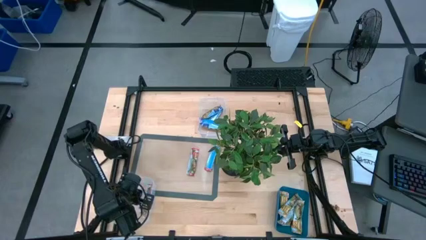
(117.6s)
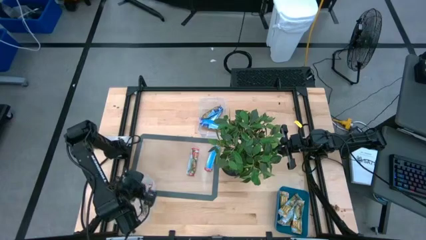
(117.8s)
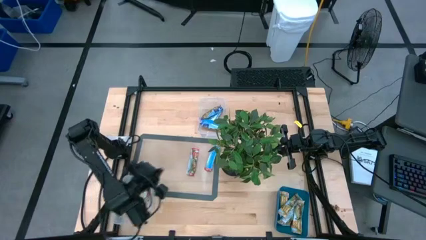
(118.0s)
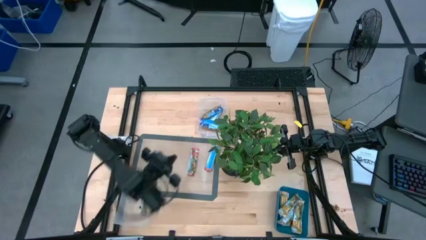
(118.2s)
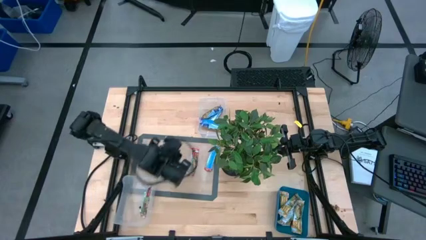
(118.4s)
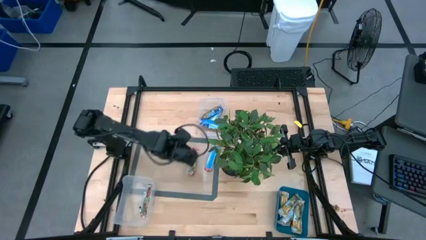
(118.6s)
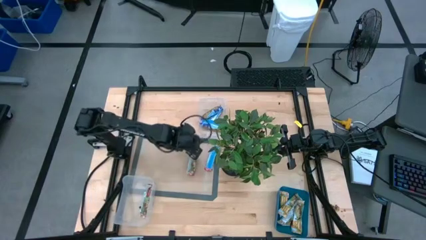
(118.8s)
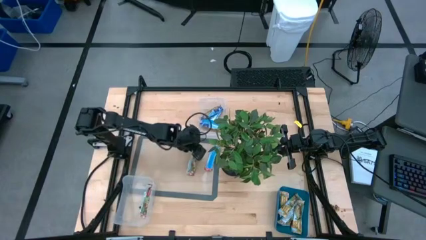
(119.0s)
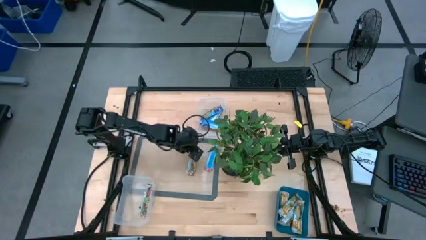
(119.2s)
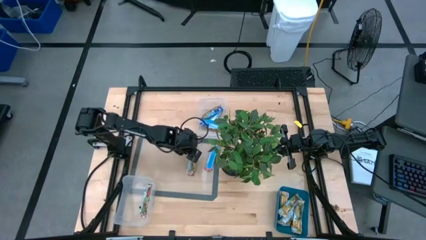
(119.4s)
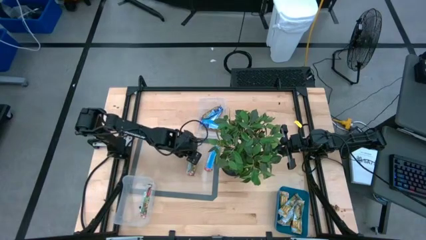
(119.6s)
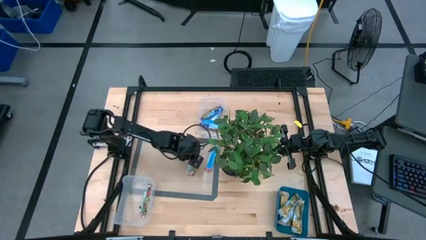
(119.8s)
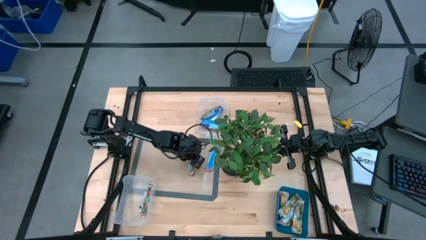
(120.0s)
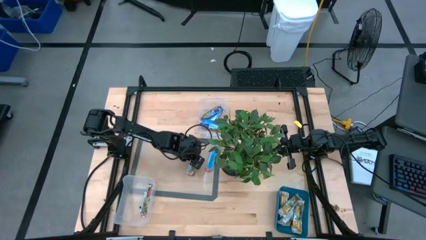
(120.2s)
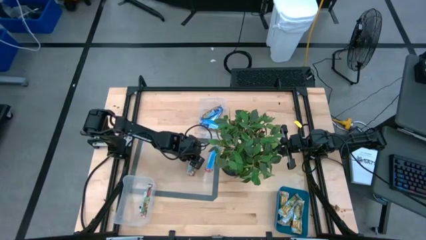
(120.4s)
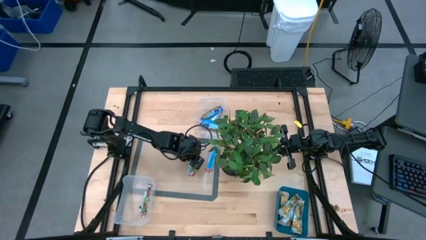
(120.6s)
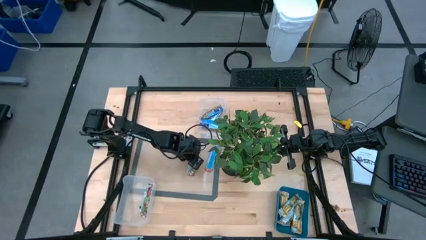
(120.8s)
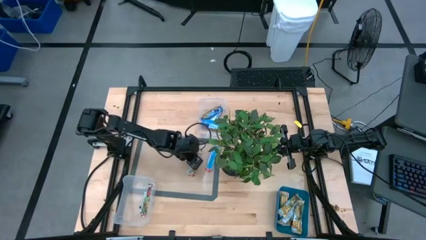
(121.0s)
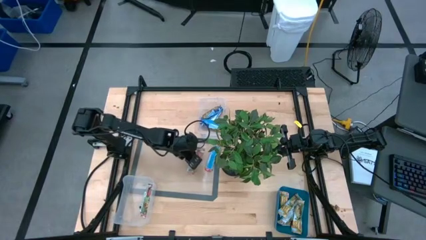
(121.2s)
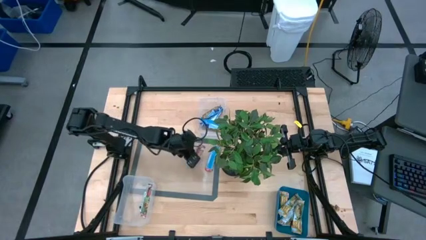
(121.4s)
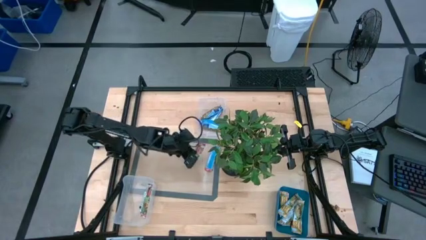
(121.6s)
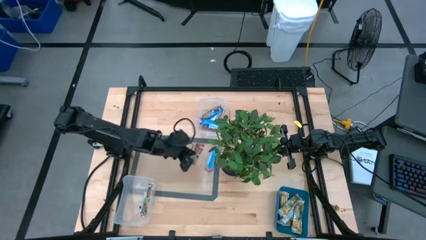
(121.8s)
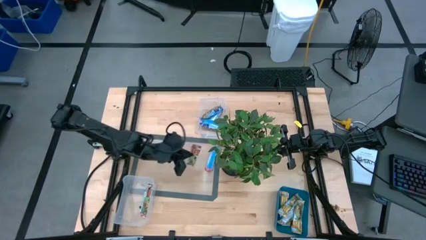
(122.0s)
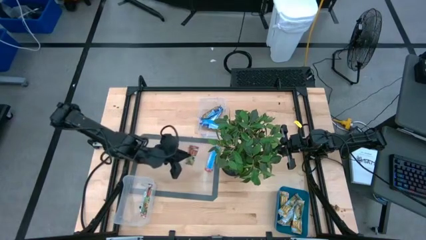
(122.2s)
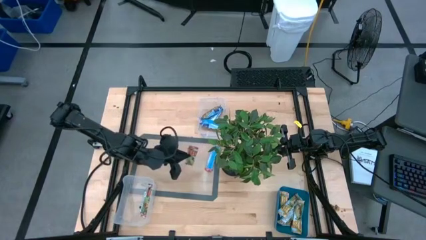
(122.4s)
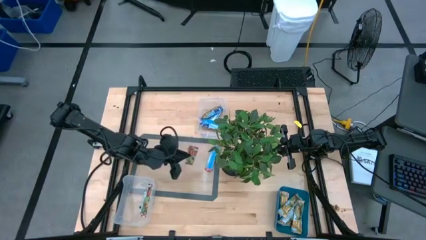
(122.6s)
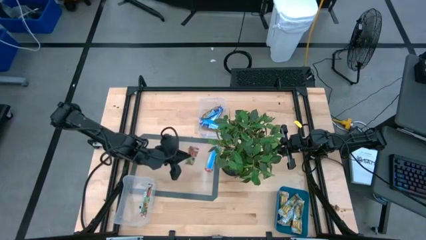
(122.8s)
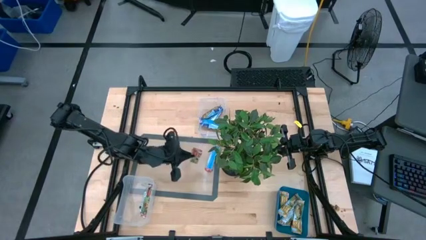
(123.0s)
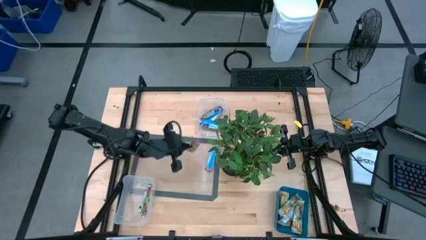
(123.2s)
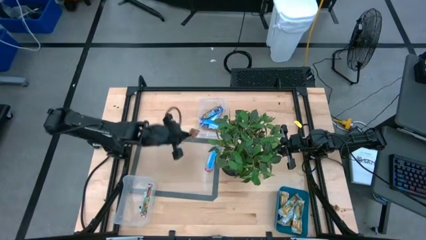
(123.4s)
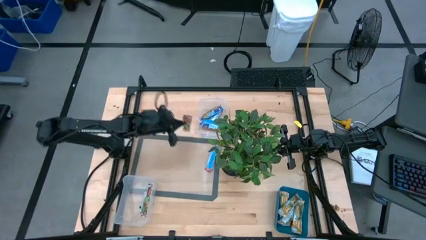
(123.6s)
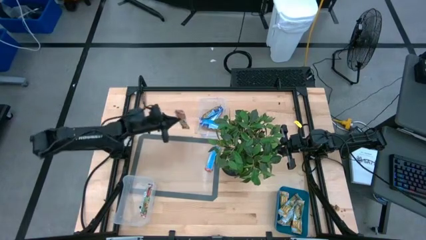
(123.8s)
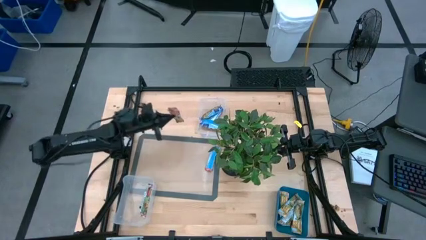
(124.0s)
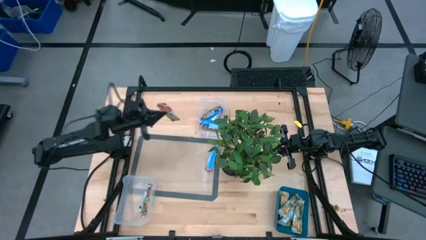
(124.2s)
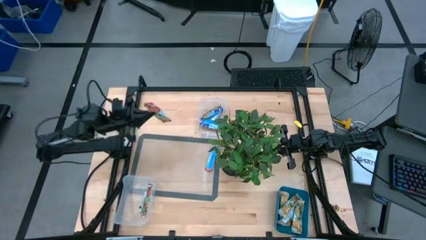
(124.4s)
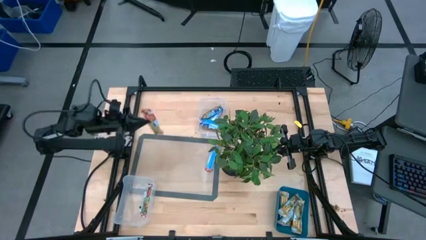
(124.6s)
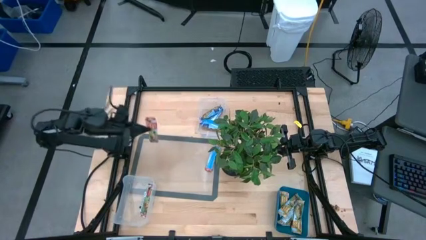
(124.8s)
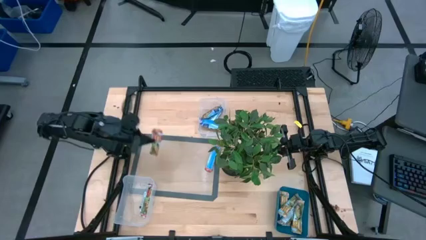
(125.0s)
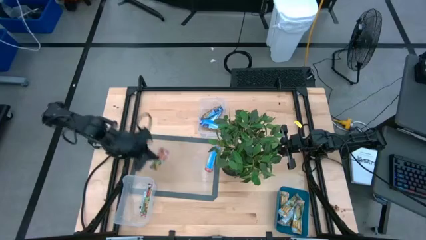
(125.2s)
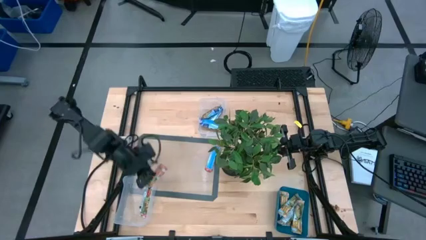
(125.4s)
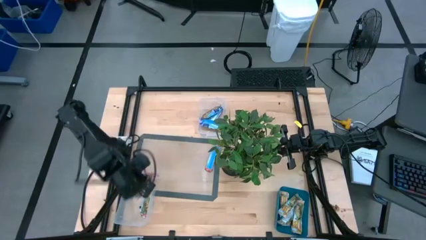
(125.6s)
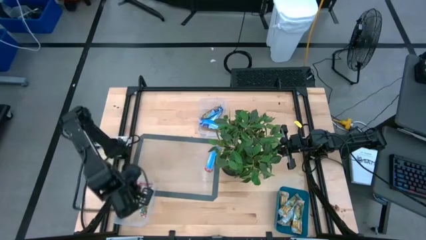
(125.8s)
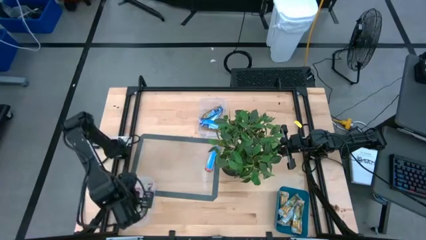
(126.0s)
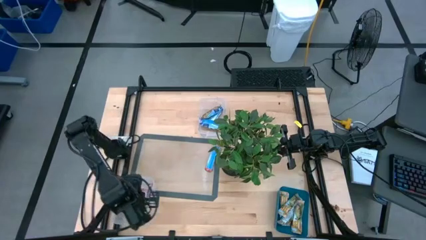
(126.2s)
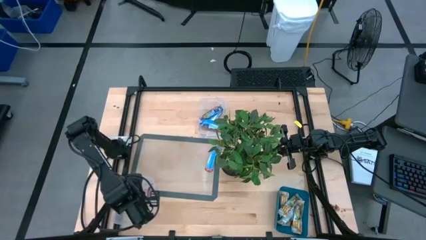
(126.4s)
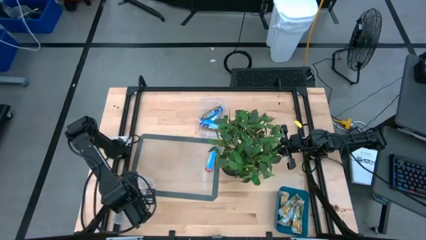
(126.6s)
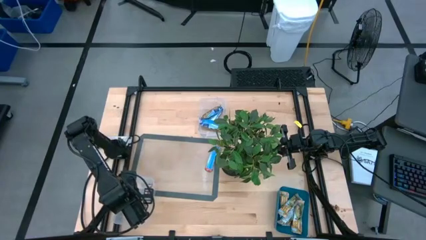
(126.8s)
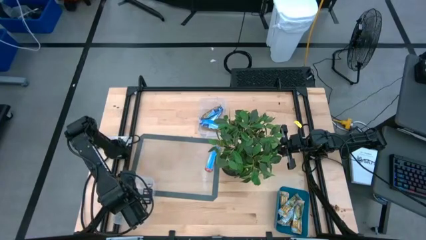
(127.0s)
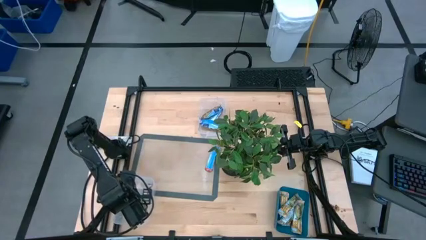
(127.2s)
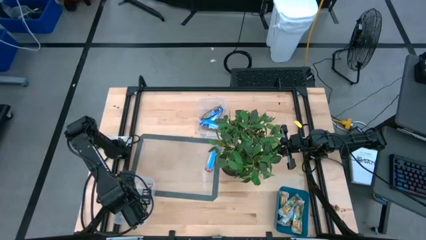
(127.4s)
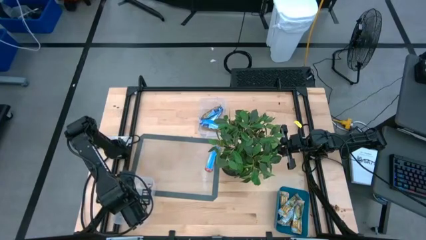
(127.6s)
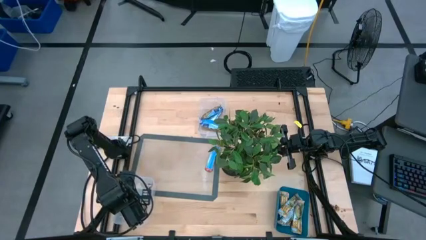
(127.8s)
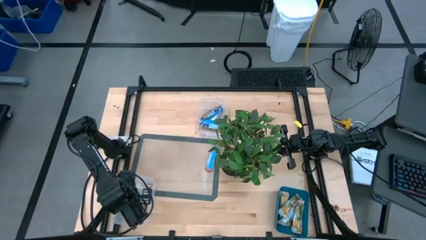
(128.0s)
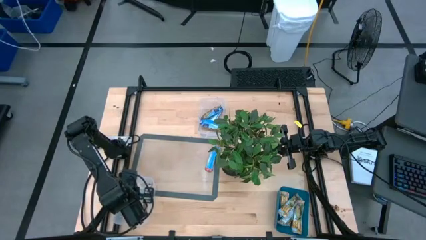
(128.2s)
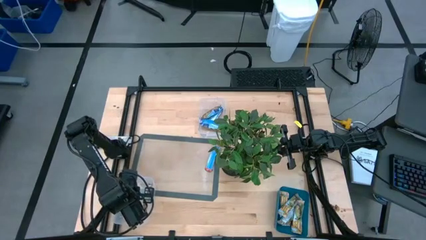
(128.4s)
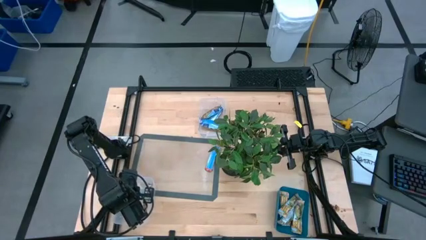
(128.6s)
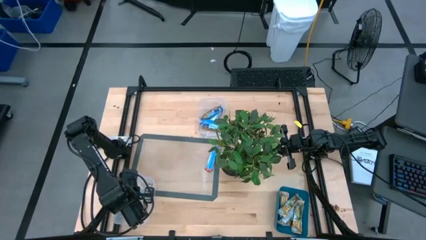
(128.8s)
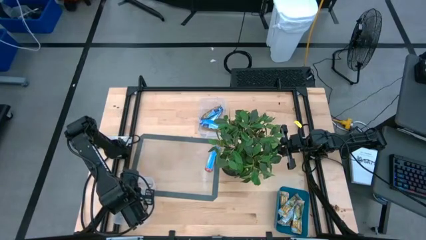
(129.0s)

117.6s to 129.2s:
Task: Pick and place Granola Bars by type
Put the left red granola bar into the bottom transparent bin

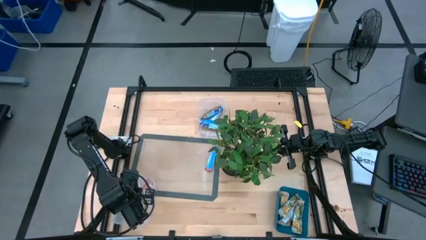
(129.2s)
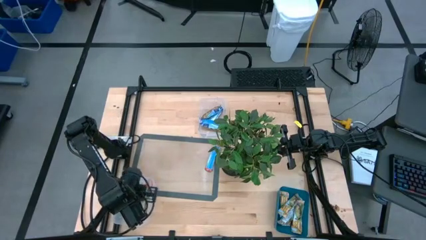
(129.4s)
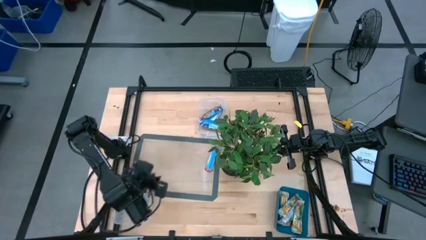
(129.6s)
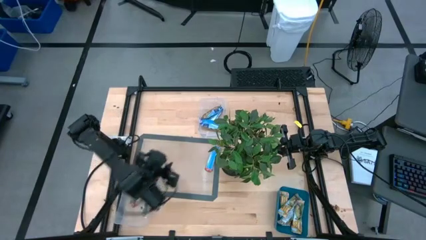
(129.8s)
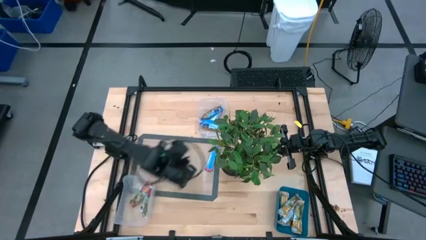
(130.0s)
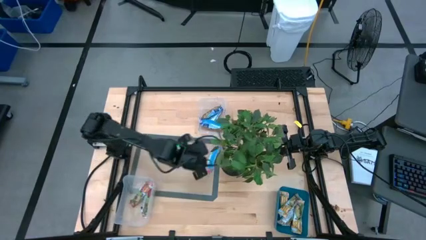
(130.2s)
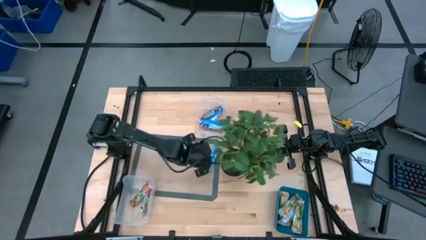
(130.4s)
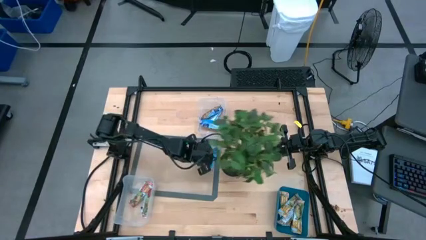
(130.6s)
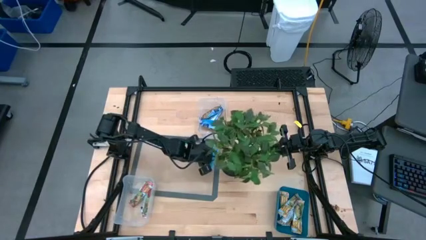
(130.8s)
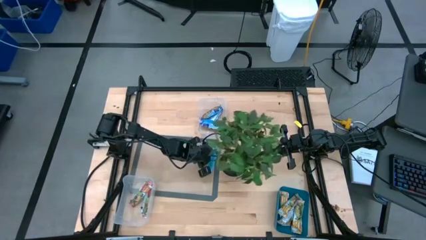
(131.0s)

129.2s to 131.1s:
Put the red granola bar into the bottom transparent bin

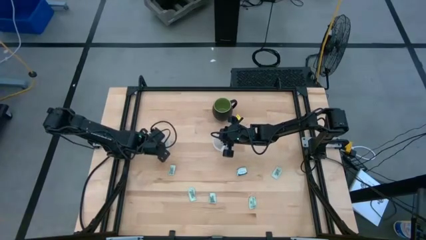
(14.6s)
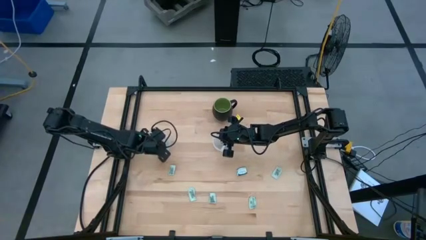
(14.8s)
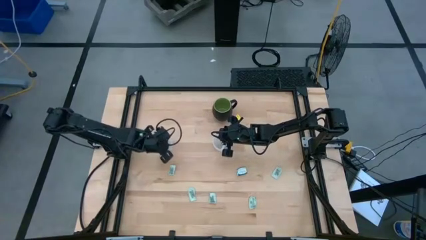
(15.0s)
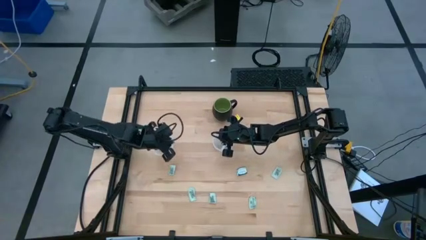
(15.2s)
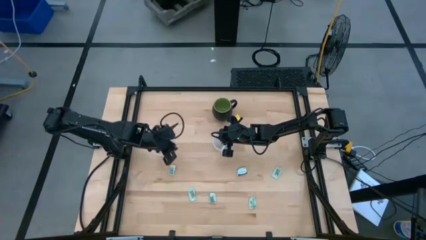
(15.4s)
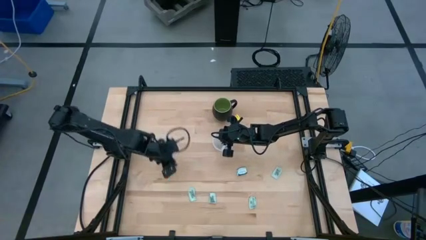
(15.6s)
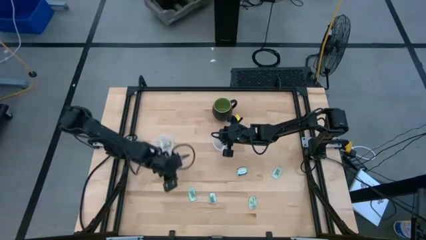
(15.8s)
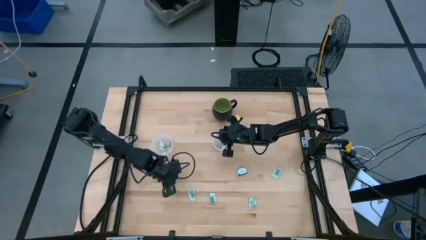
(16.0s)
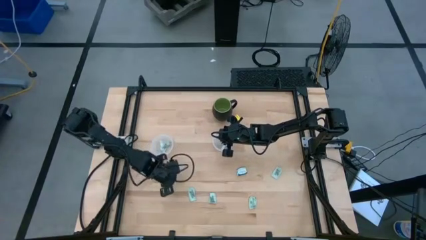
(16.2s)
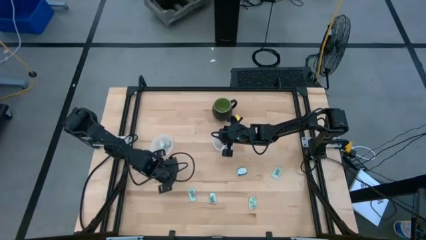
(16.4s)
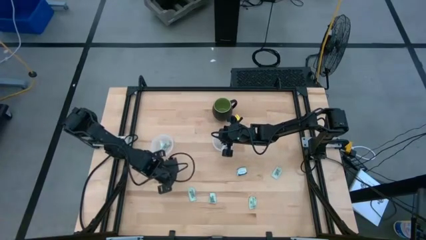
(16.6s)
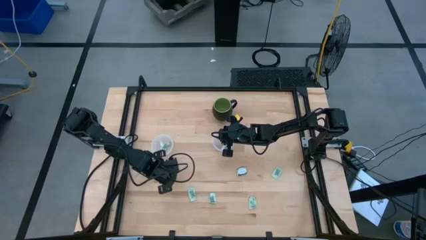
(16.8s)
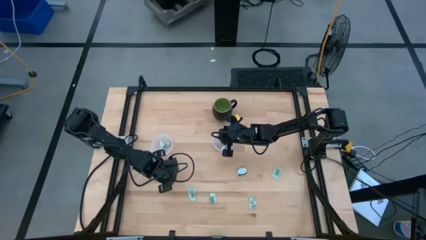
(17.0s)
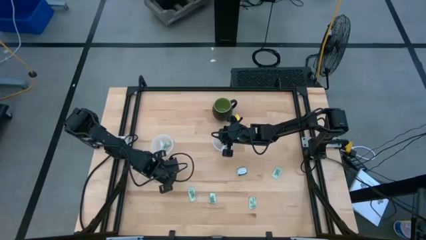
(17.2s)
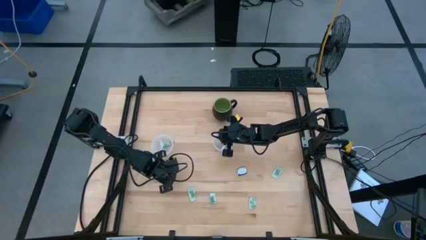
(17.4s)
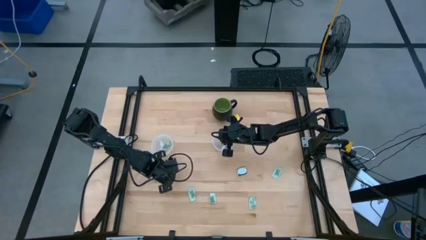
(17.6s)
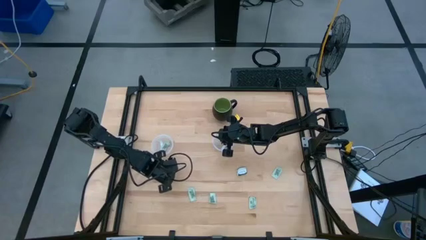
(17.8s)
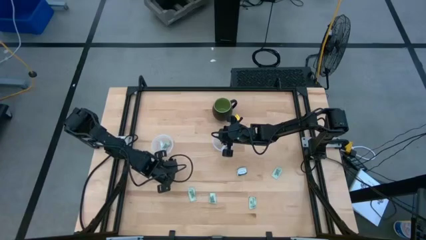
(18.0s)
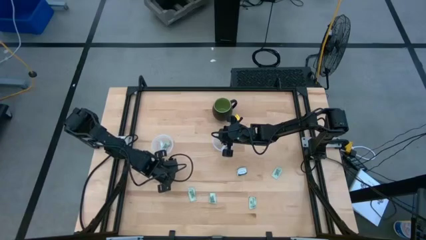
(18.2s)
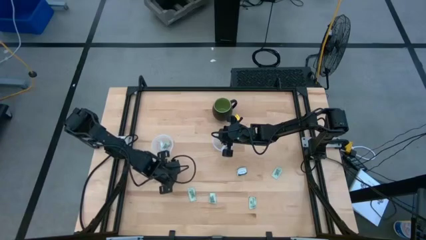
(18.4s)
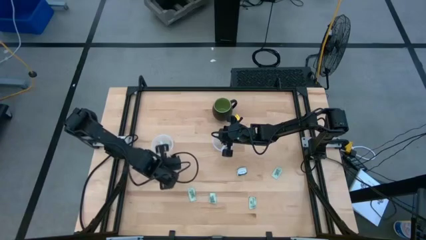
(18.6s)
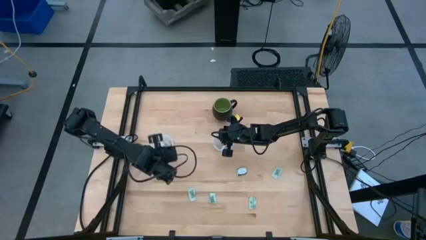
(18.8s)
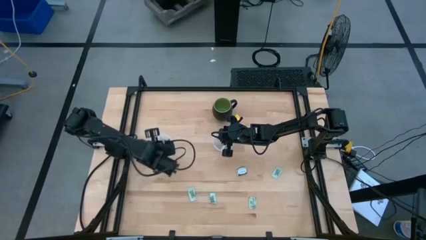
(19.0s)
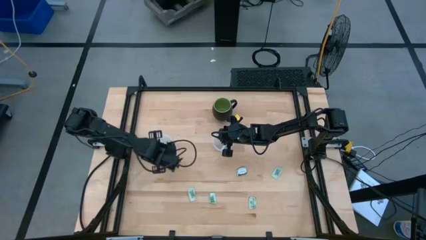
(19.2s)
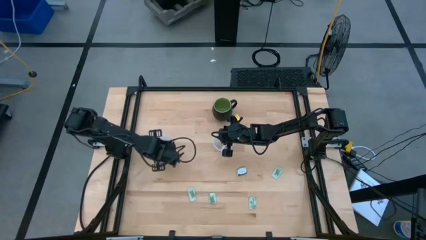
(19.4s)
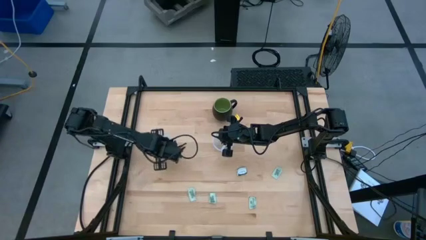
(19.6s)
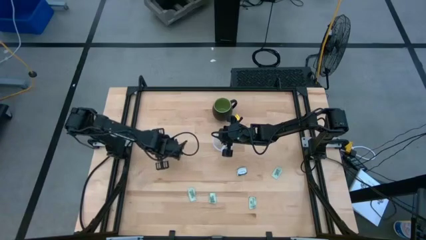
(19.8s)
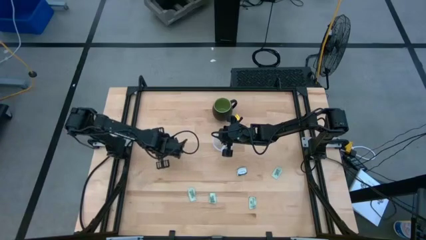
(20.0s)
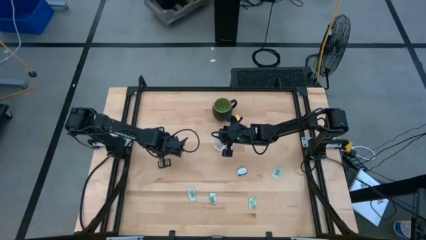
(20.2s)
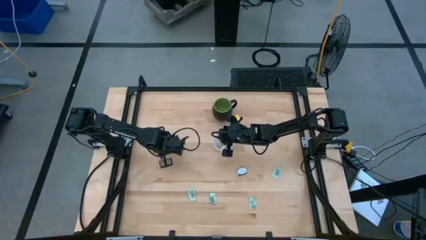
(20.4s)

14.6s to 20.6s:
Task: Pick and place Stevia / Truvia into bins
Put the white stevia packet into the left transparent container
